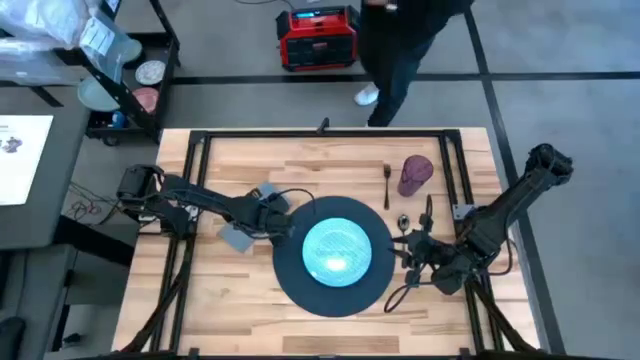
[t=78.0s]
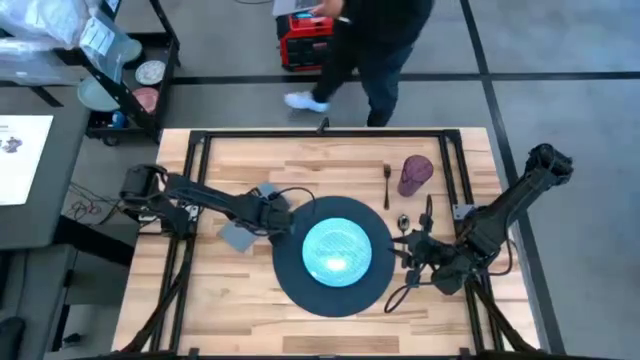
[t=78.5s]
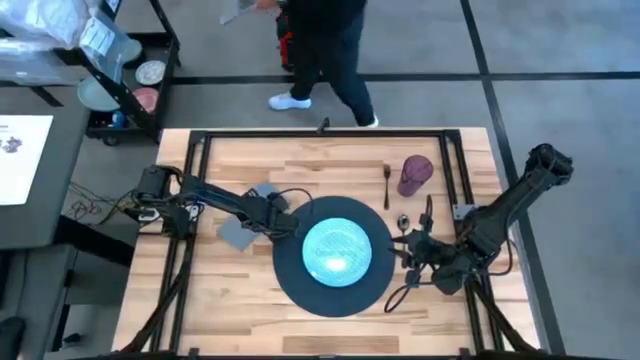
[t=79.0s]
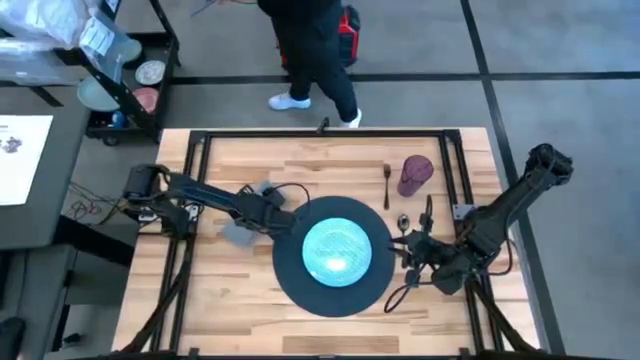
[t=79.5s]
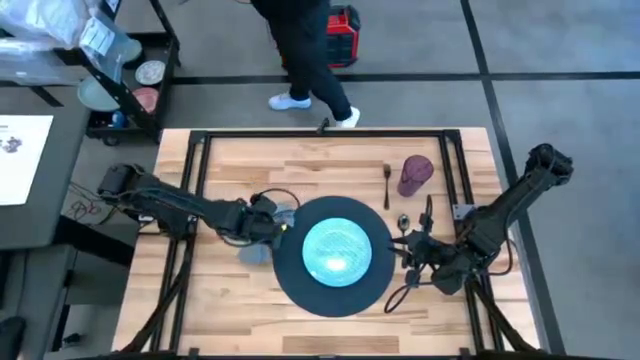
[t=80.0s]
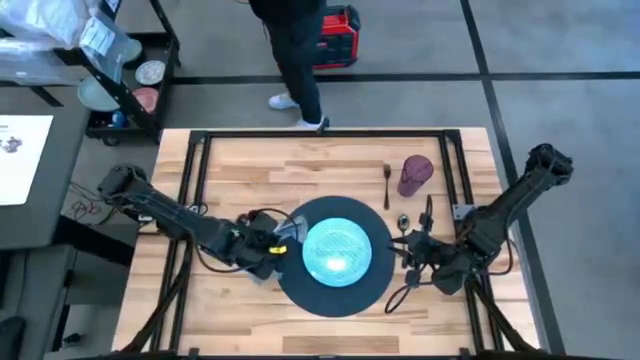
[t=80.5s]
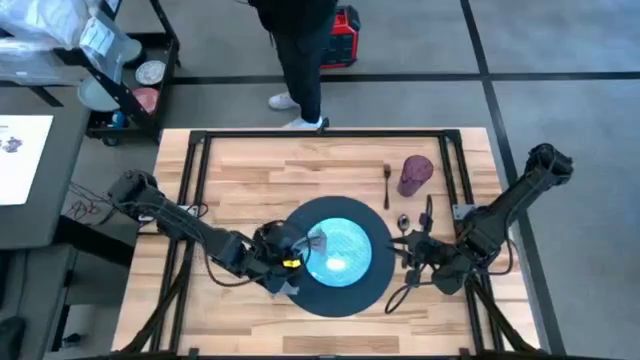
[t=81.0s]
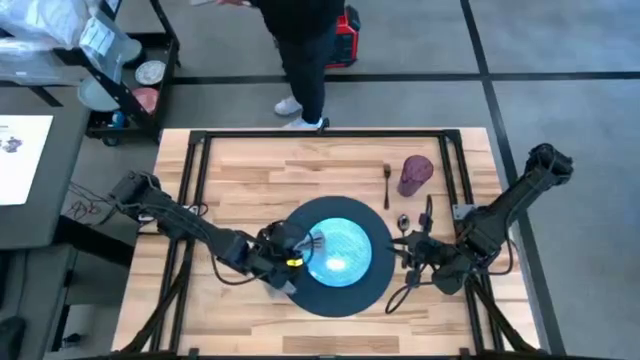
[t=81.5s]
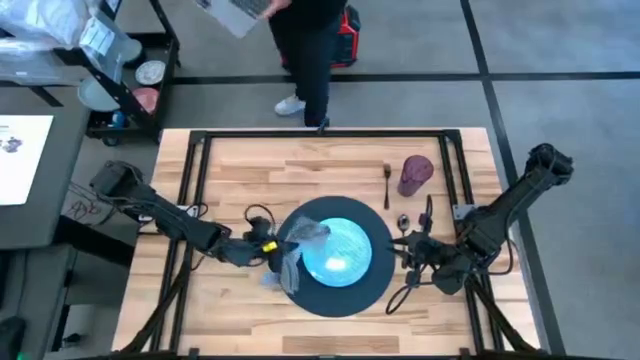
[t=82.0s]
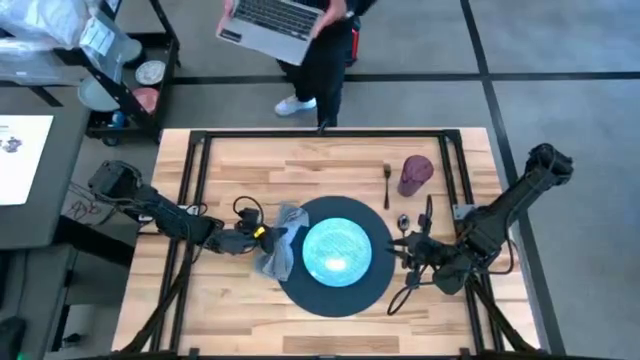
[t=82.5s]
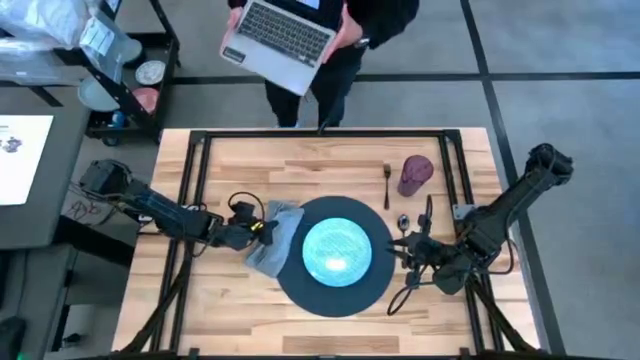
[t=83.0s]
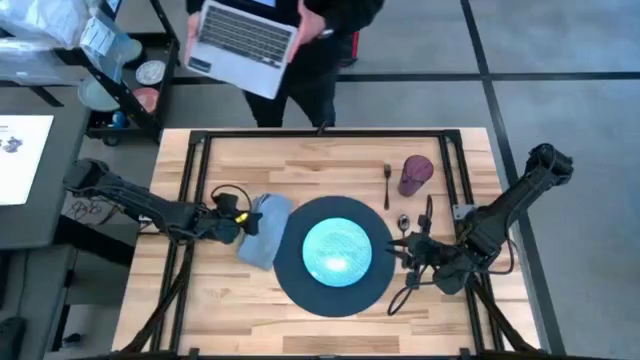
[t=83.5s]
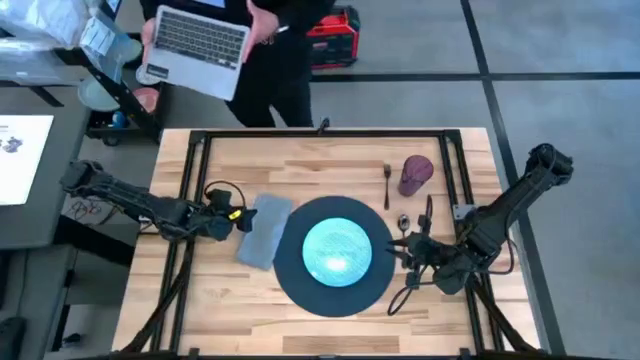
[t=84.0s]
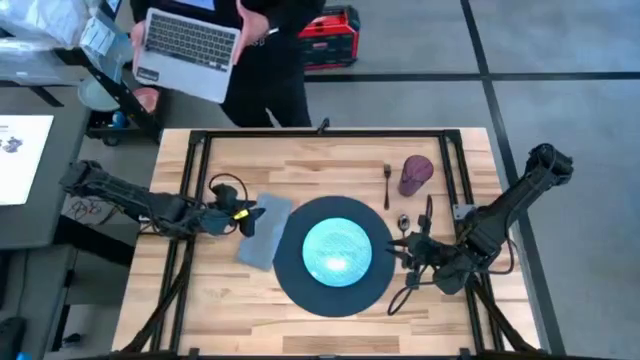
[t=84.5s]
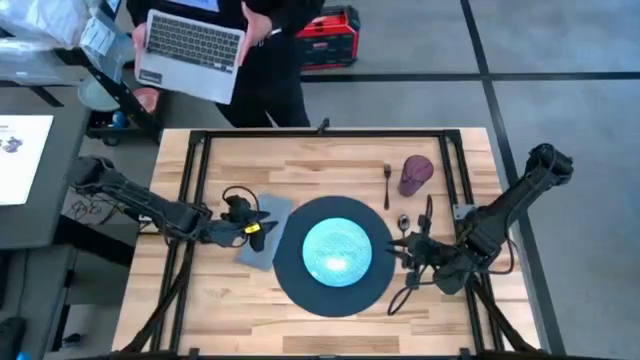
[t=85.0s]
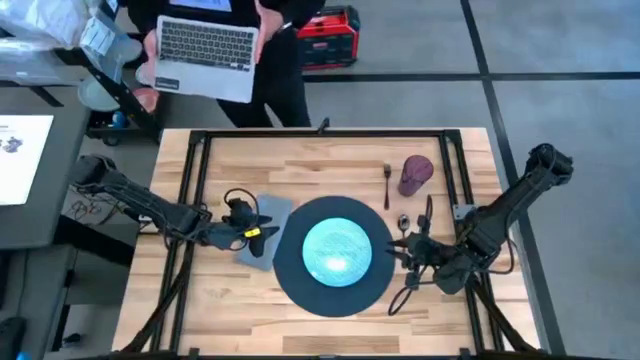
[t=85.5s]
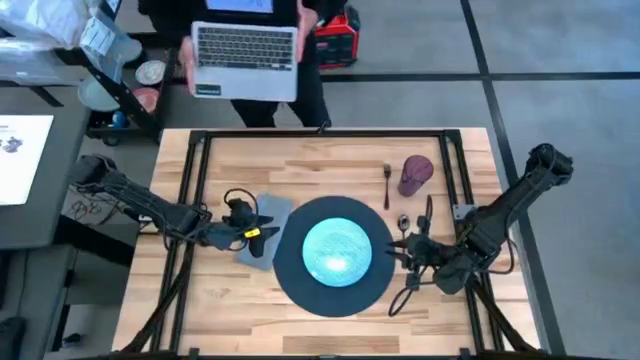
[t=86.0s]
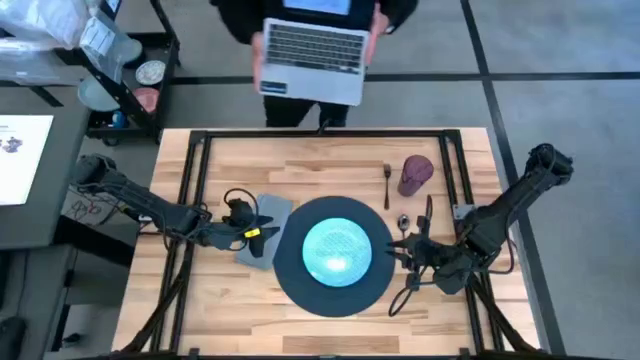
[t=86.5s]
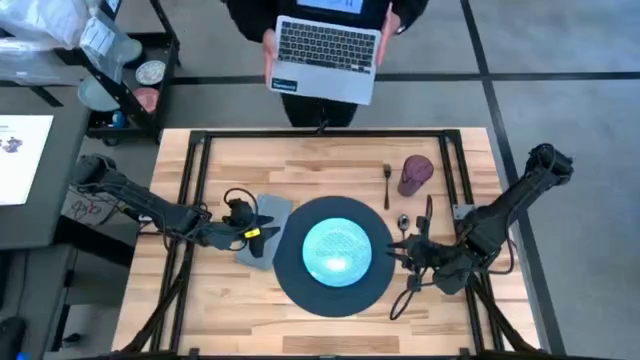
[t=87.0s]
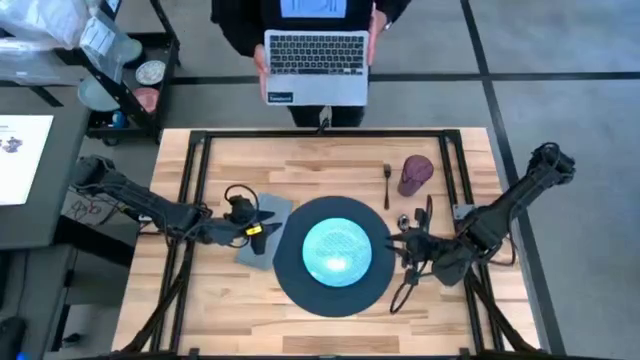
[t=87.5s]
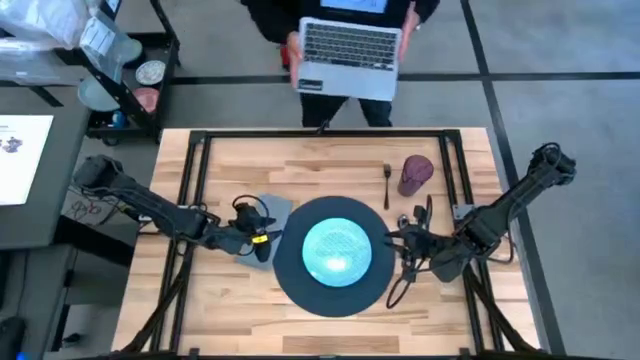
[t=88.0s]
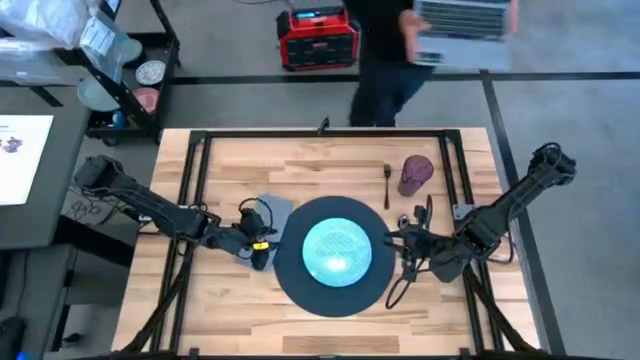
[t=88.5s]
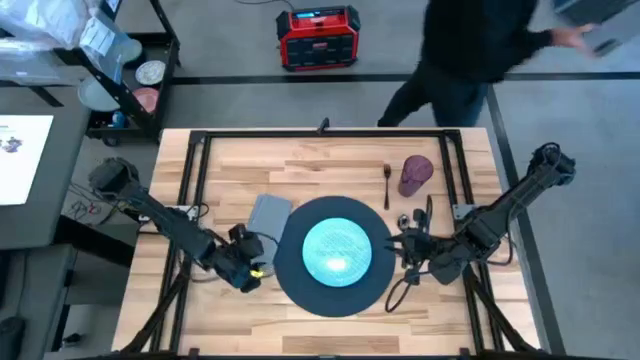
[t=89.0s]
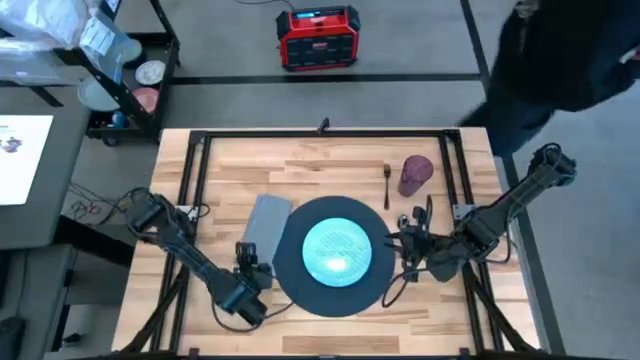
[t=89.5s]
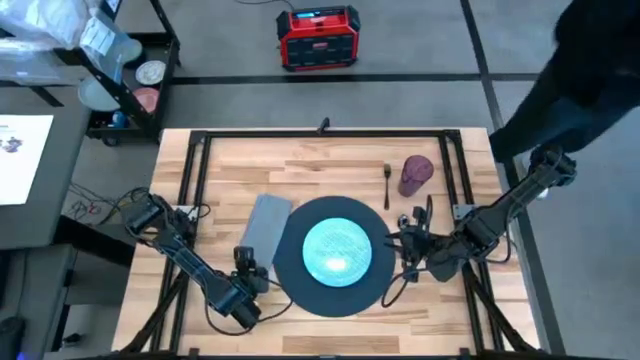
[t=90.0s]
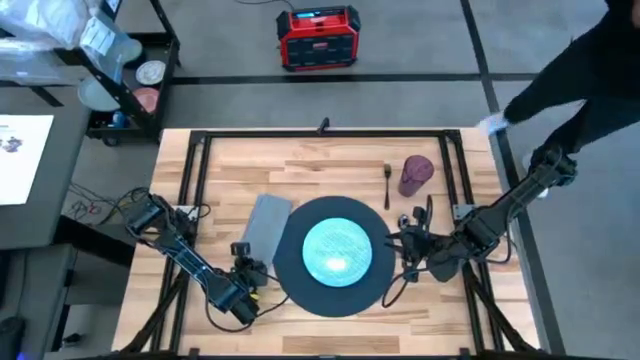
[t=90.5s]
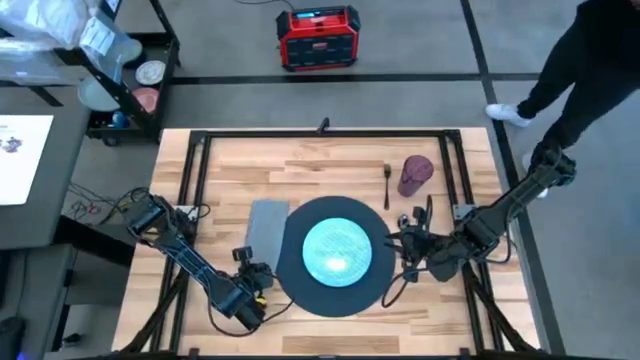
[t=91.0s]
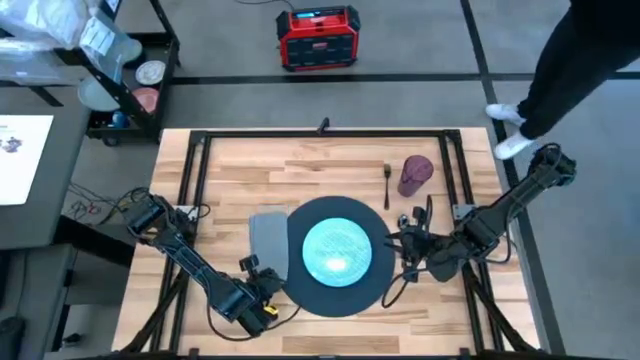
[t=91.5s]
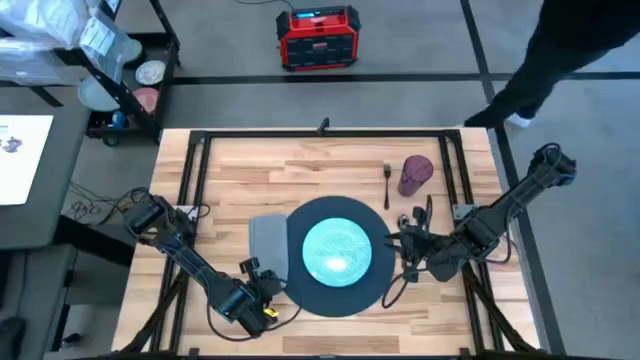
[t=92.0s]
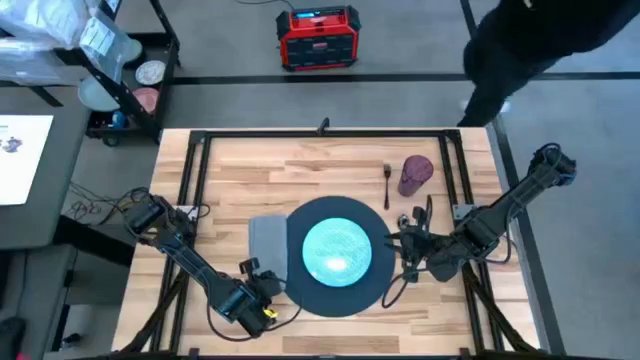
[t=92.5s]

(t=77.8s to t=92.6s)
Task: Set table place
Move the gray table napkin on the left side of the blue plate

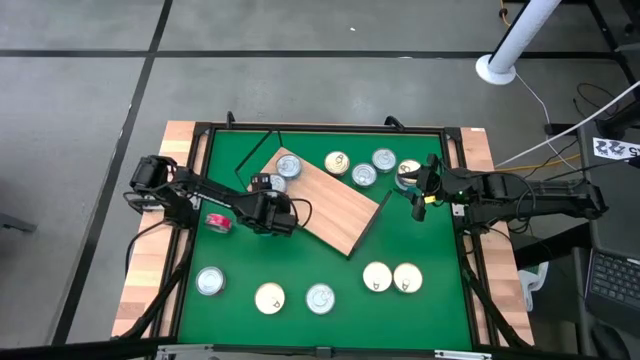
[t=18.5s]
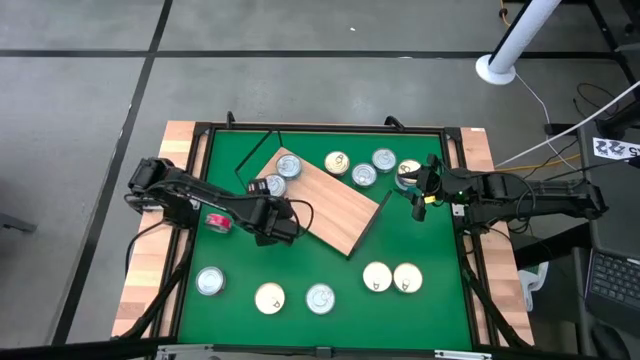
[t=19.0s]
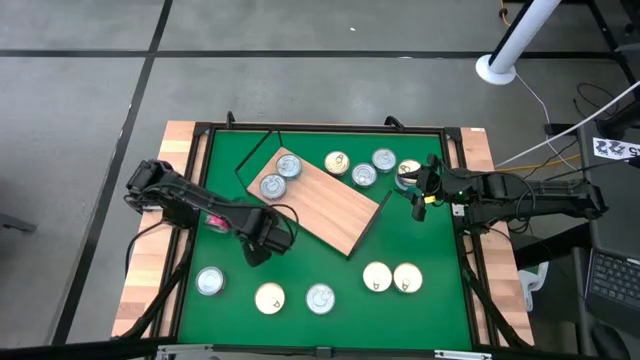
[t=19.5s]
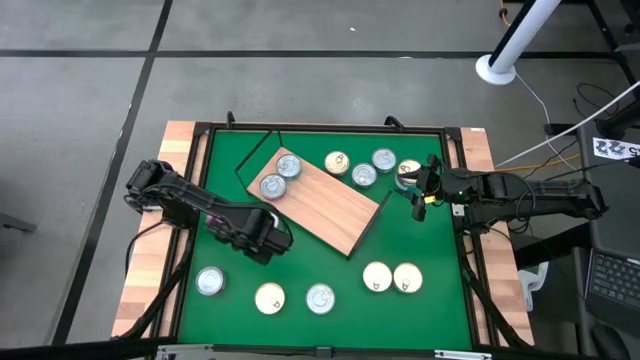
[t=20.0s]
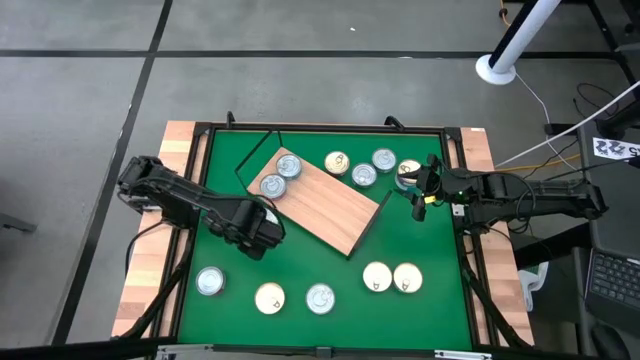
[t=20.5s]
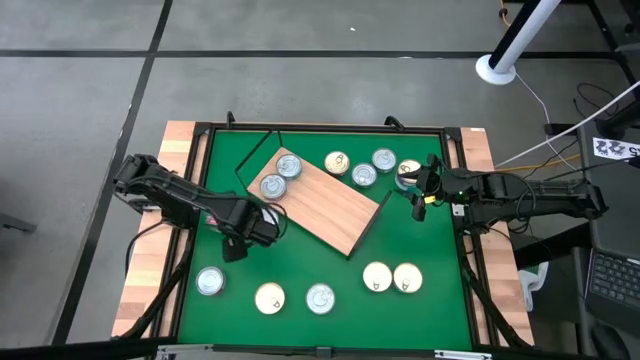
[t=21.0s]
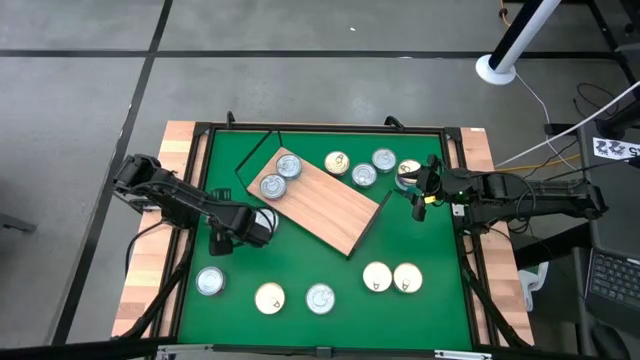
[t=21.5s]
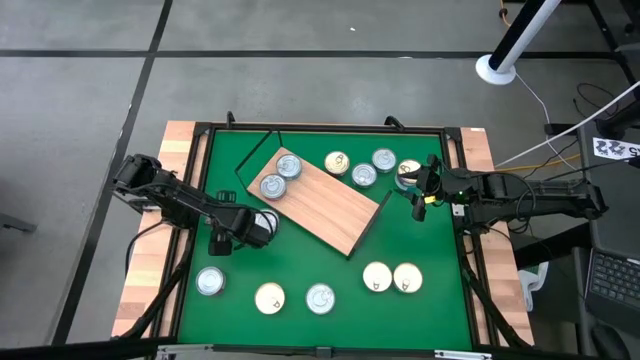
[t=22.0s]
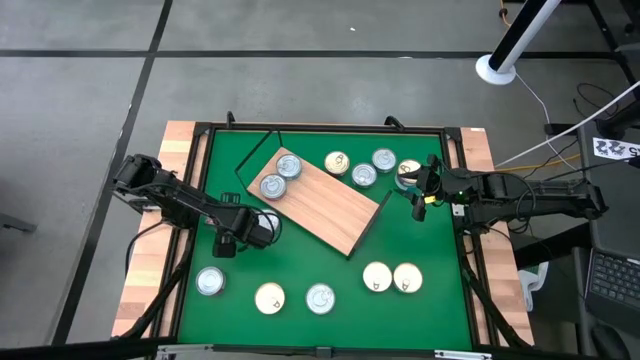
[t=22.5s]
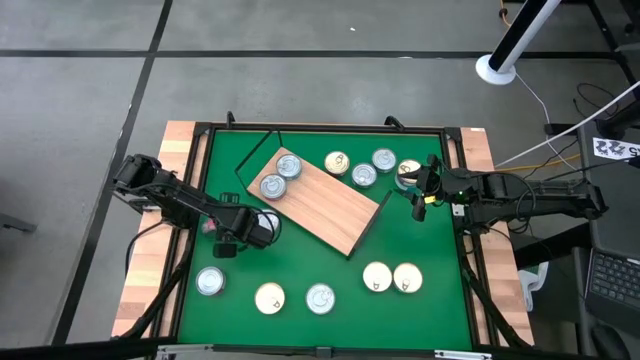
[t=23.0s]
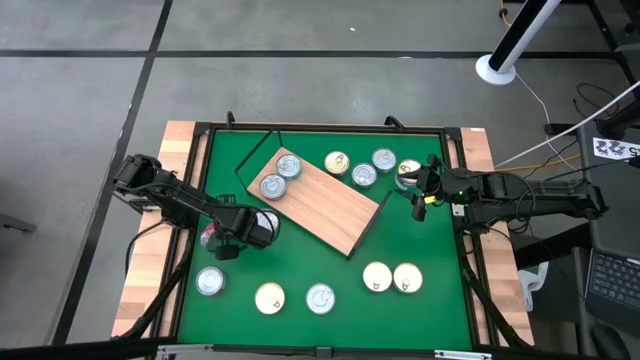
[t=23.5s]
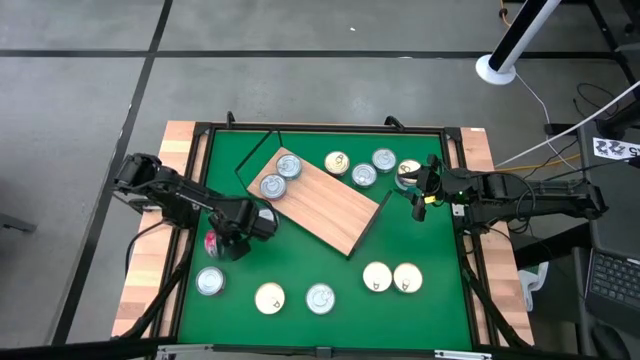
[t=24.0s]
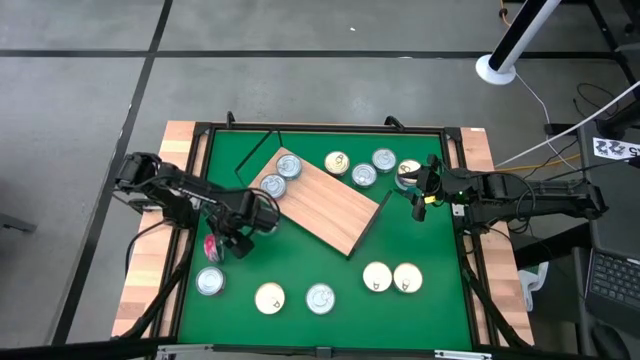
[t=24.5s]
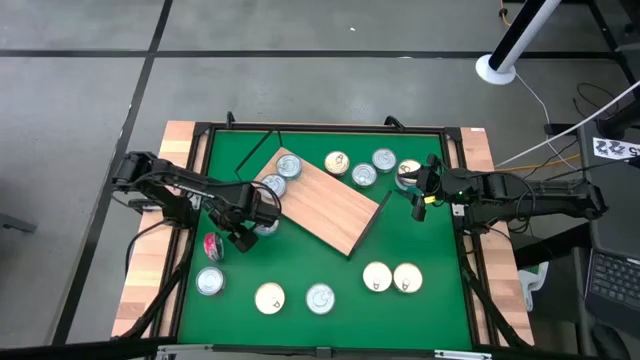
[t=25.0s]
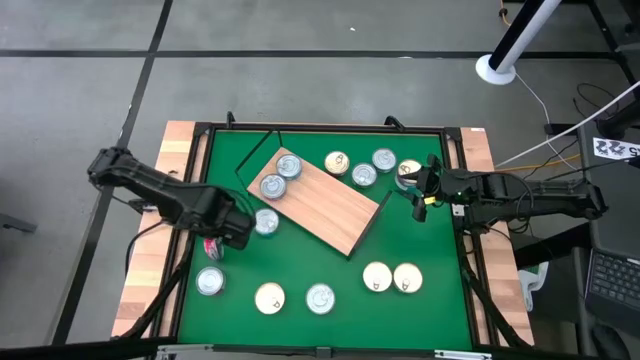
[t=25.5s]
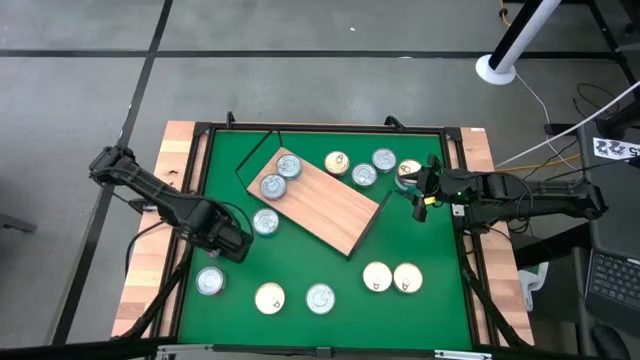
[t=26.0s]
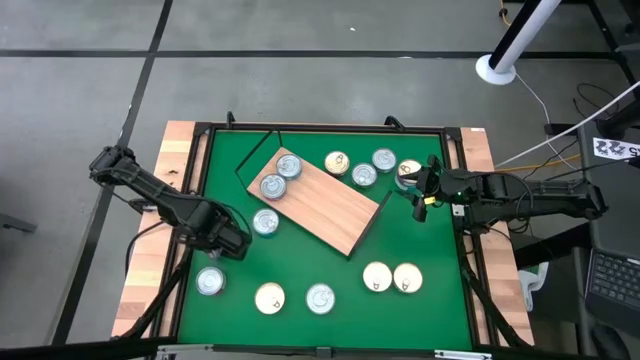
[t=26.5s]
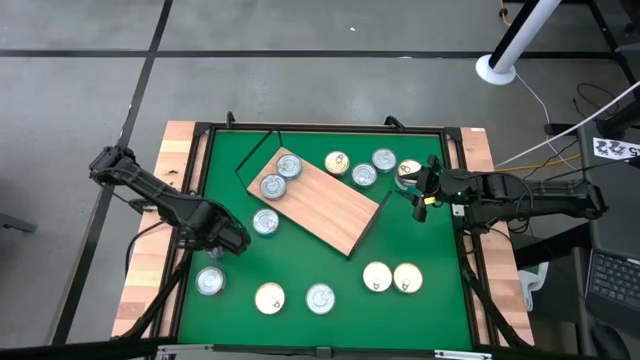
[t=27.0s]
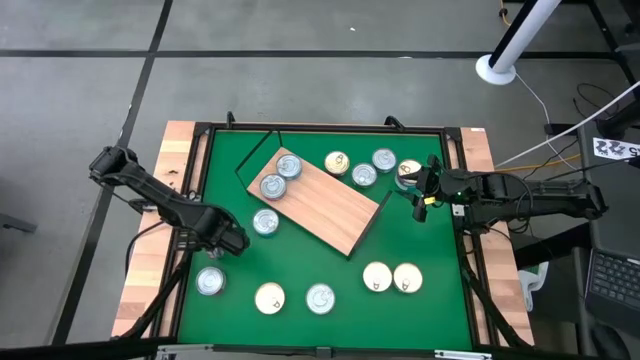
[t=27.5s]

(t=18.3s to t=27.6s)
Task: Stack canned seafood by type on shelf
Stack the red tuna can on top of the red tuna can on the shelf
